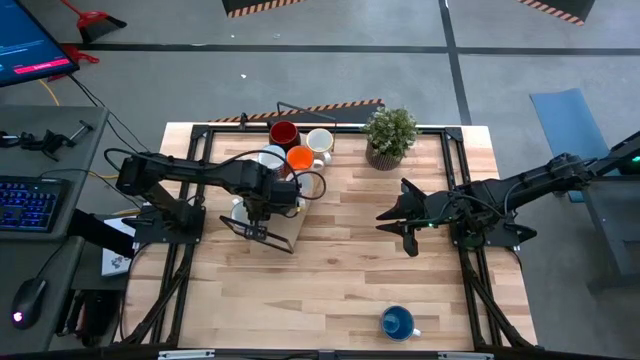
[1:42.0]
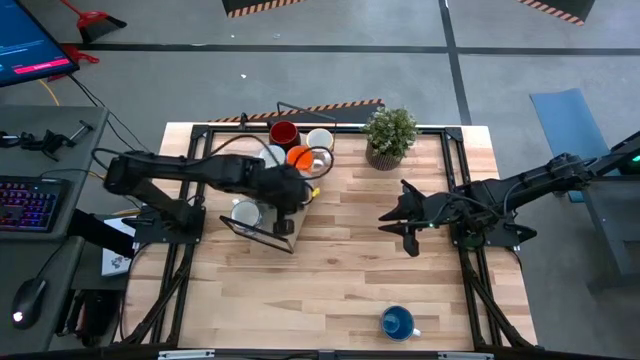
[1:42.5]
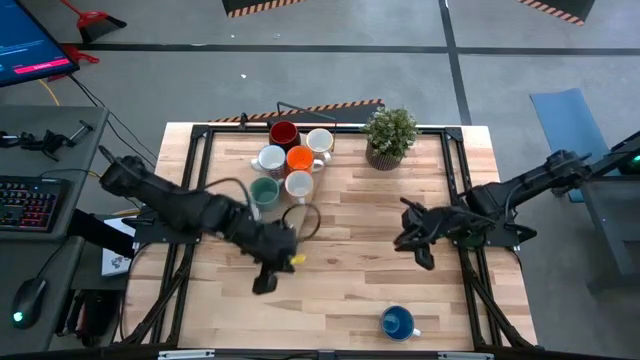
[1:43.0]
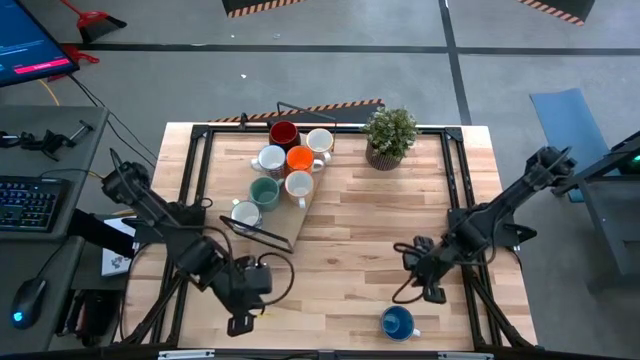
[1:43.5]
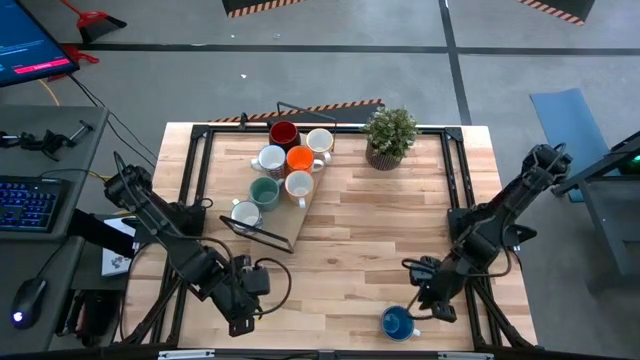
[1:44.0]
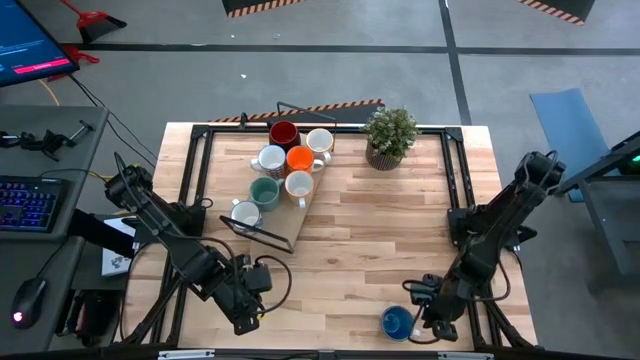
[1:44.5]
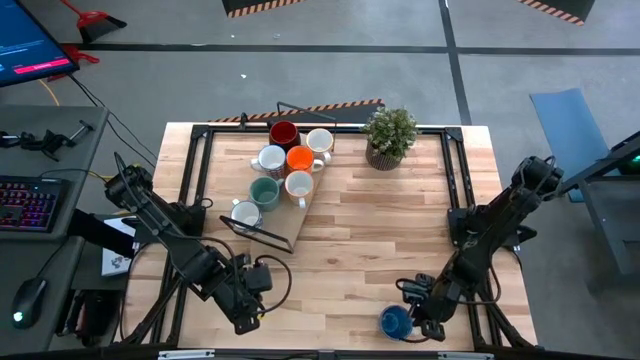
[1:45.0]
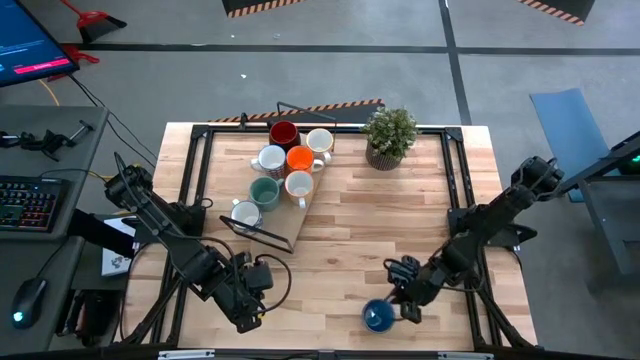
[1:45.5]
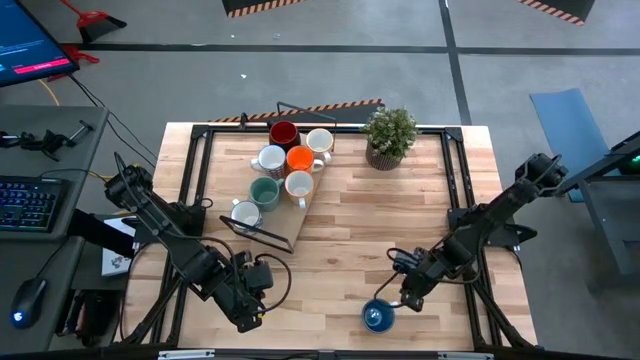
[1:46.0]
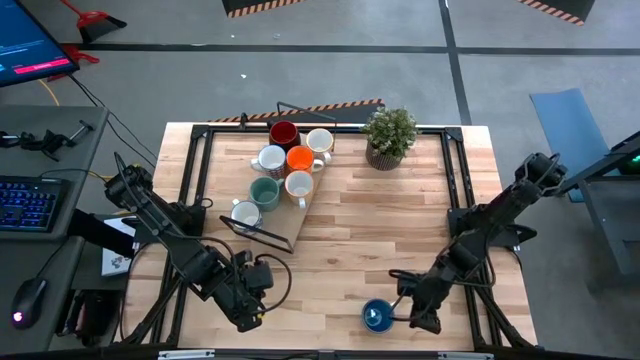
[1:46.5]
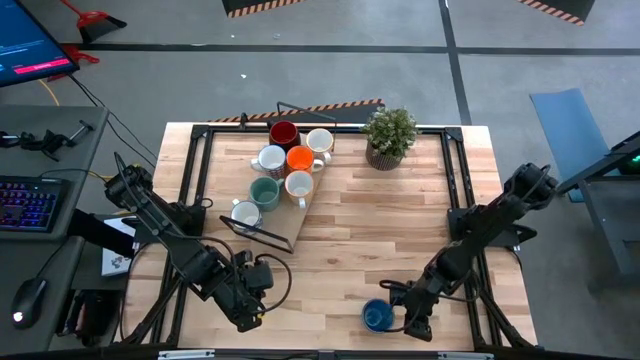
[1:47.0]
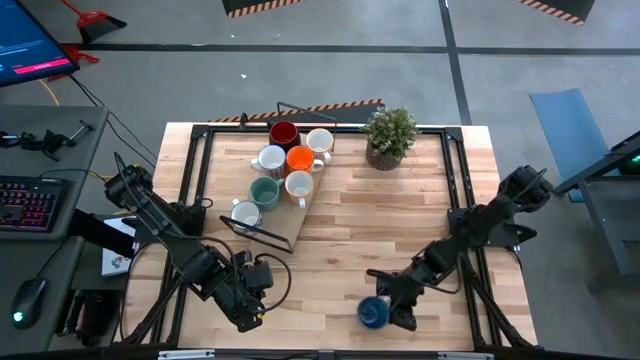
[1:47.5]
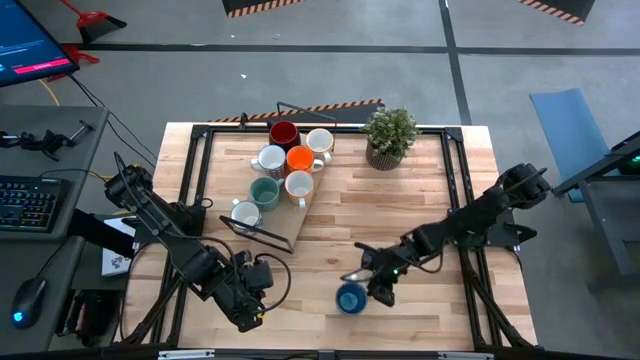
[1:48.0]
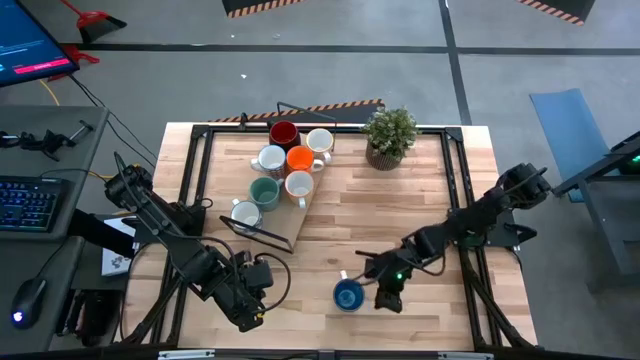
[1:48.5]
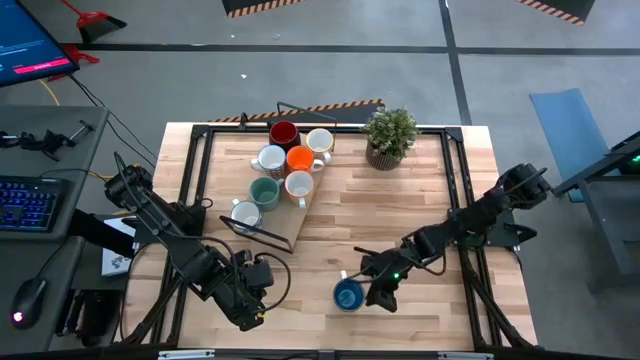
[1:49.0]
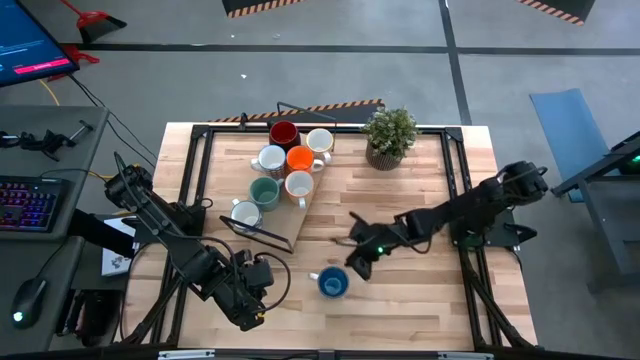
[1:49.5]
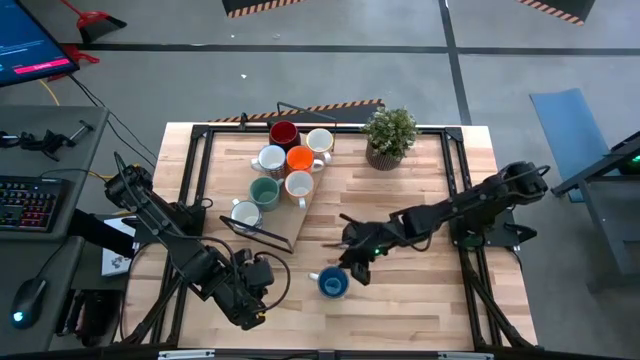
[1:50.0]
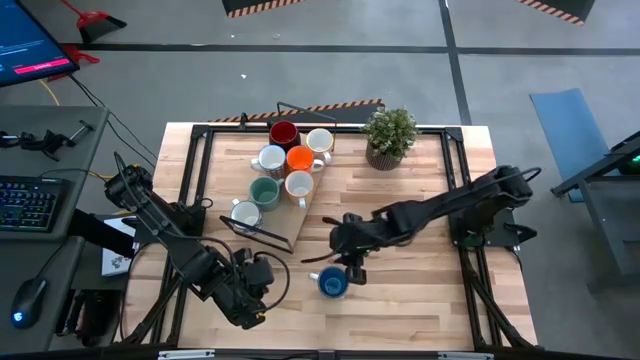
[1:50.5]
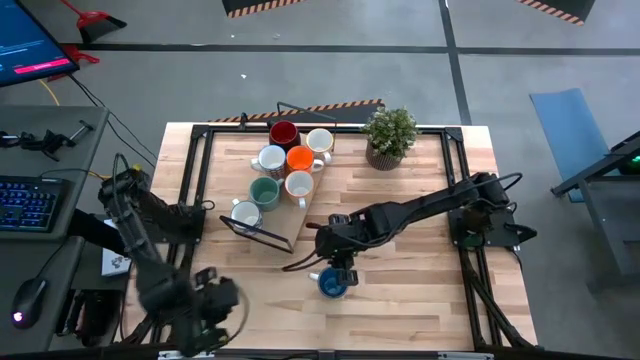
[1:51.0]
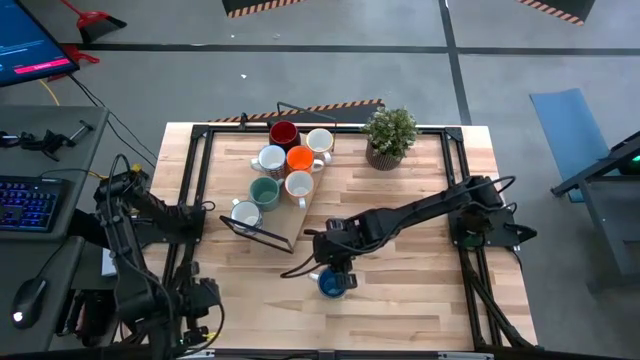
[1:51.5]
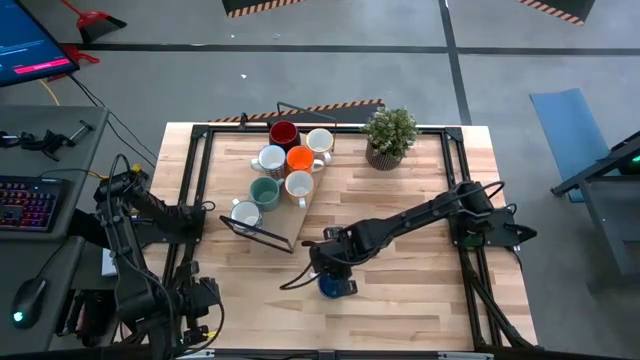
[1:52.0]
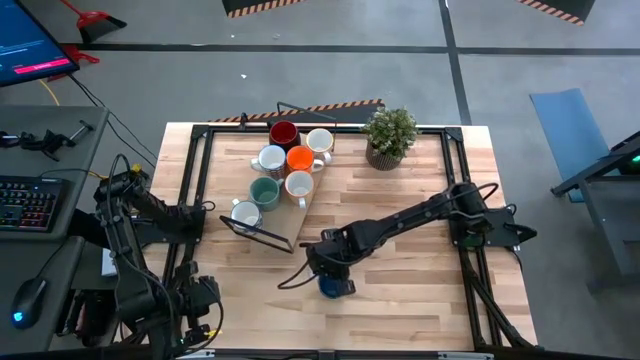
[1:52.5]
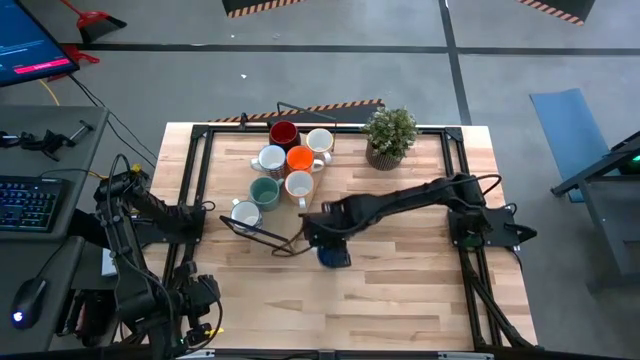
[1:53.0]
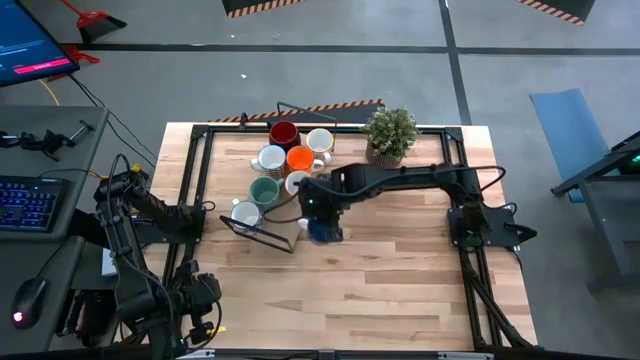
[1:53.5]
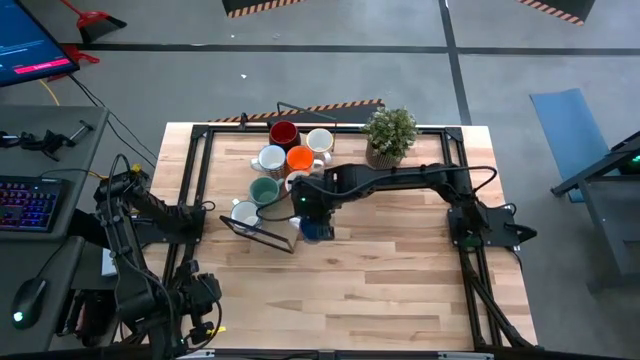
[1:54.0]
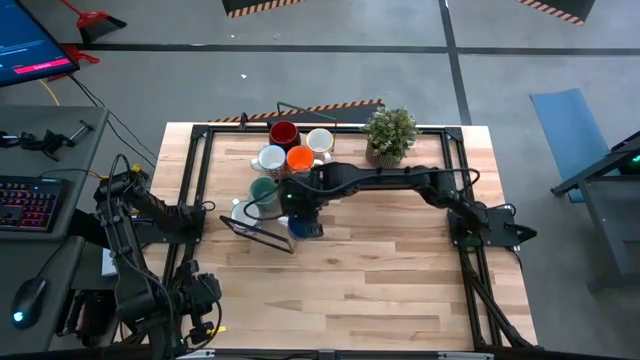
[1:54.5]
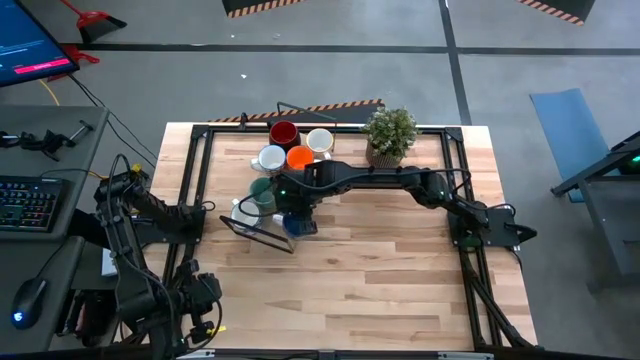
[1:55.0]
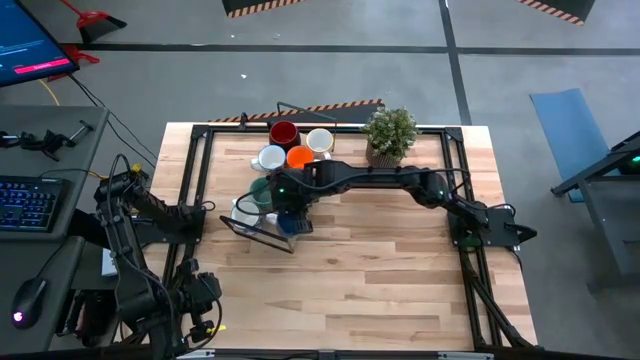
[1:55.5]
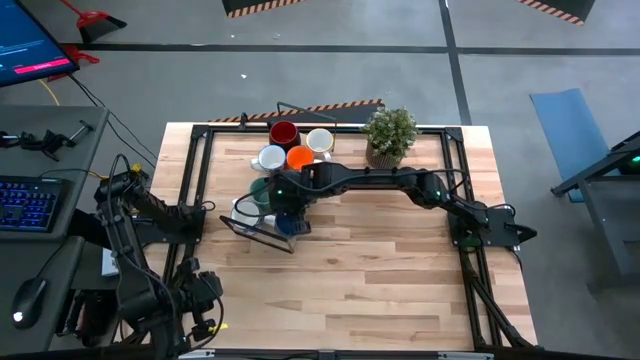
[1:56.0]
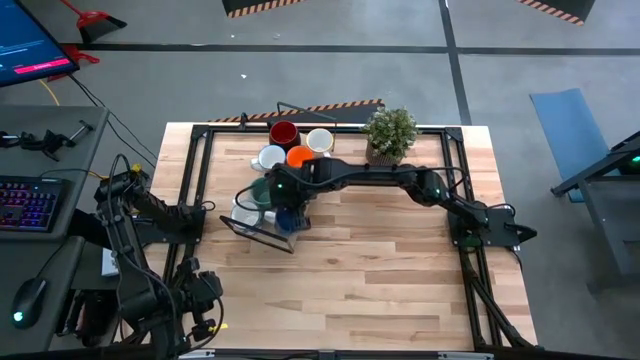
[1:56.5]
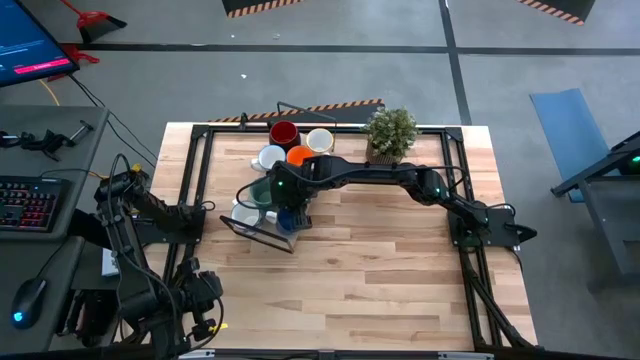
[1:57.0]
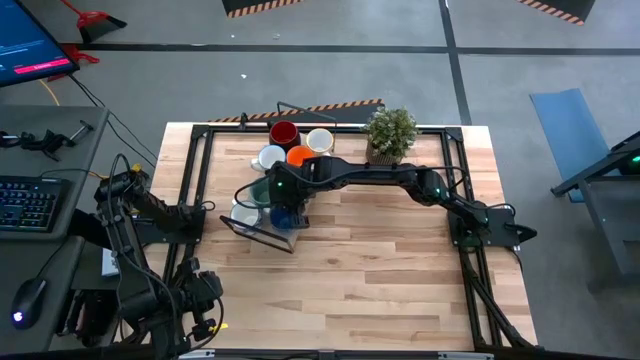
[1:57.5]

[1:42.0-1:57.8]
Task: Place coffee mugs
Put the blue cup on the shelf

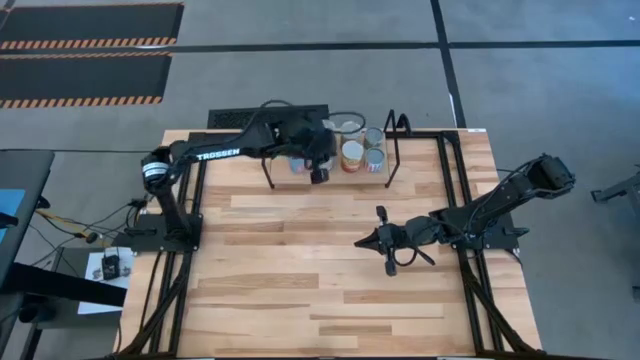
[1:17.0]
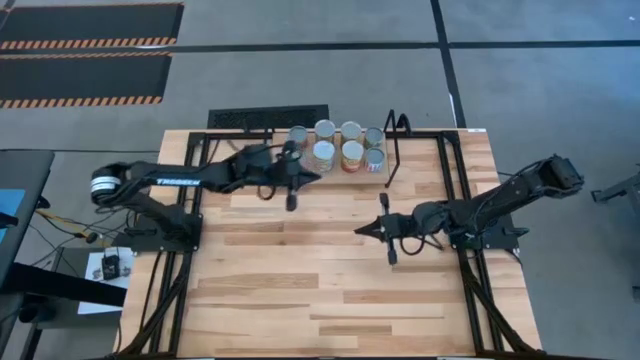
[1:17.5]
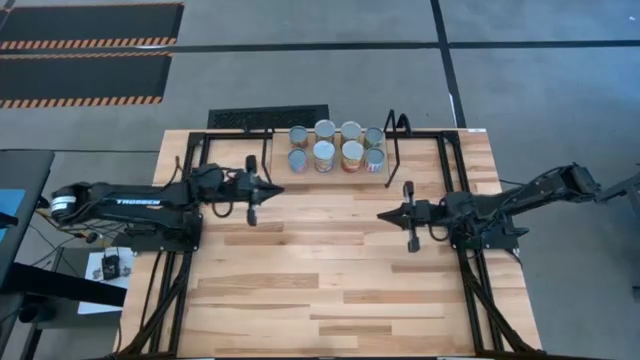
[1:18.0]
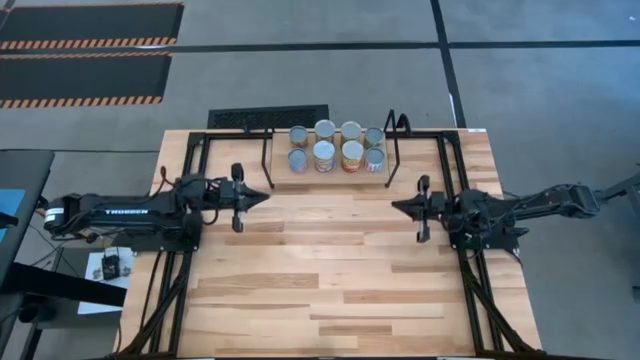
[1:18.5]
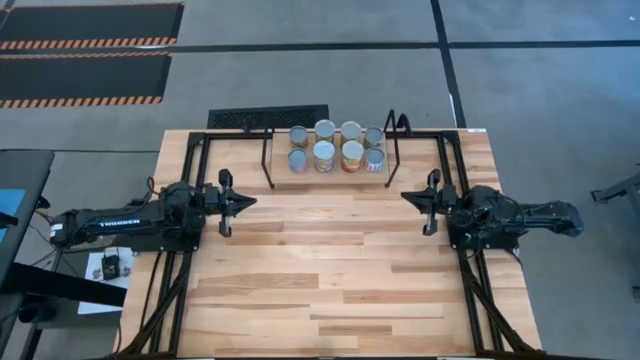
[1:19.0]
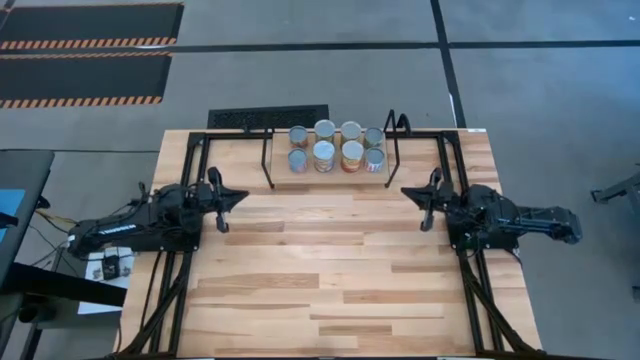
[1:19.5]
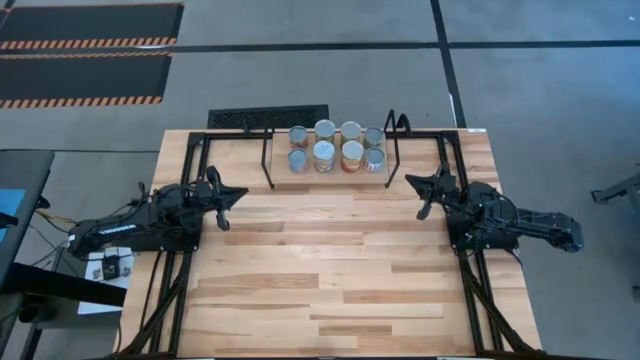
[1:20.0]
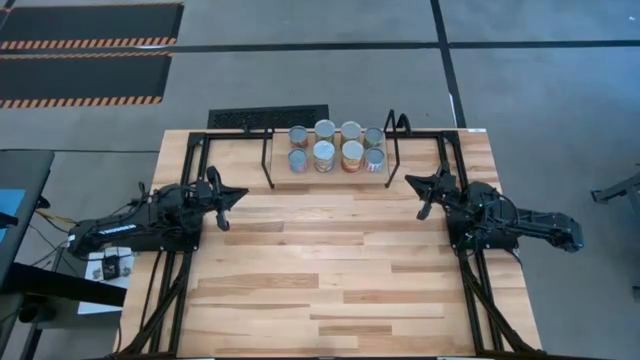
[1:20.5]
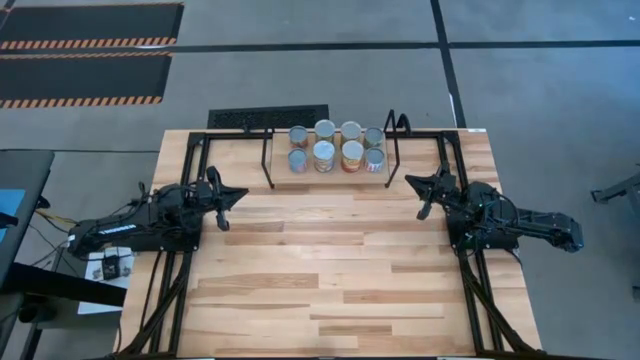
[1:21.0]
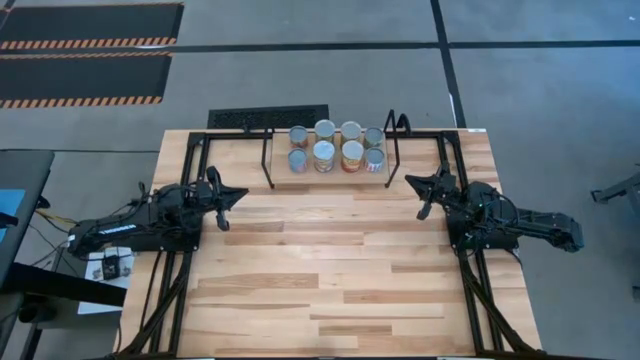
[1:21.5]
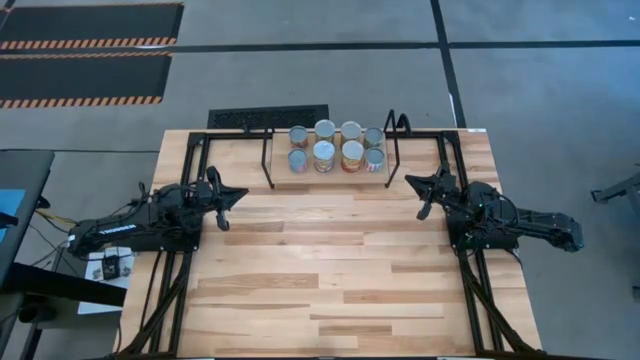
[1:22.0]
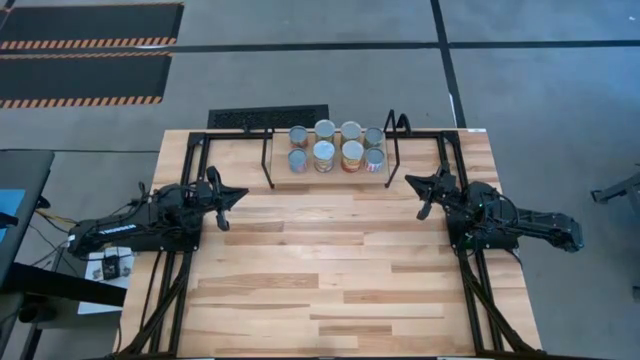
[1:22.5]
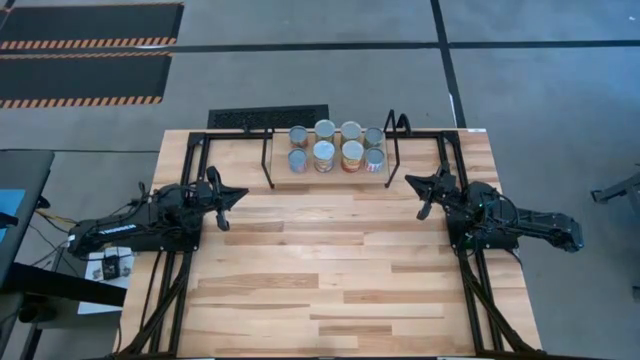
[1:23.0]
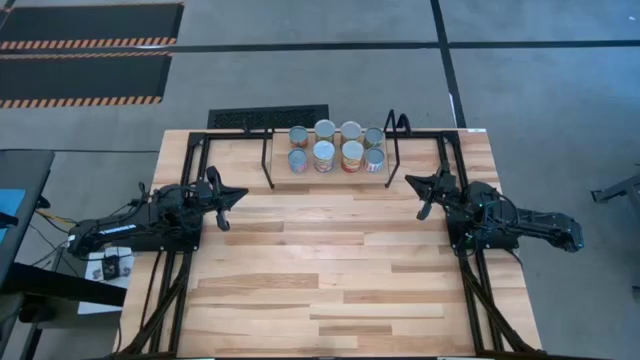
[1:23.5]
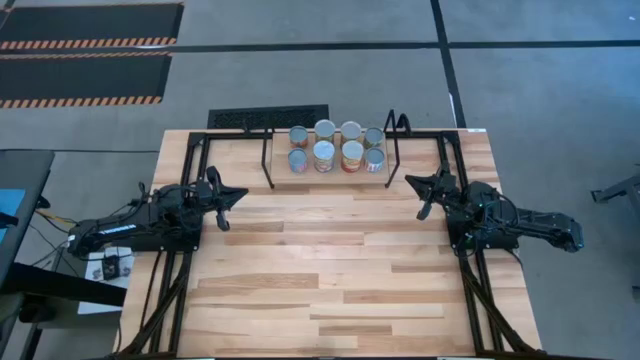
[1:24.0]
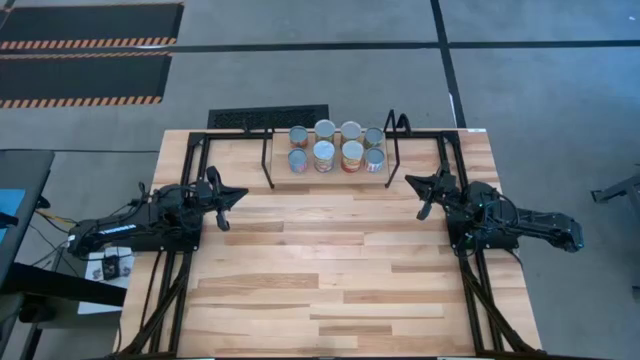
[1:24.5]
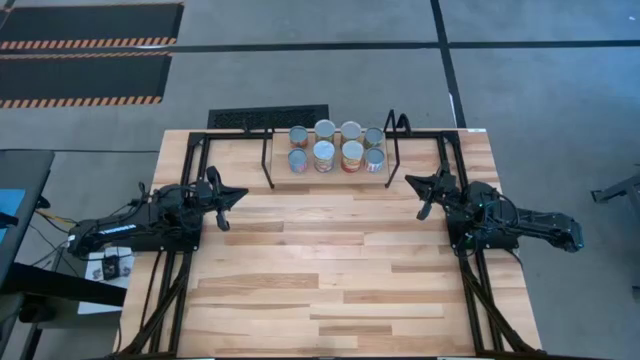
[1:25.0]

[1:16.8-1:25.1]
Task: Pick and place cans onto a shelf
Return to Home Position
